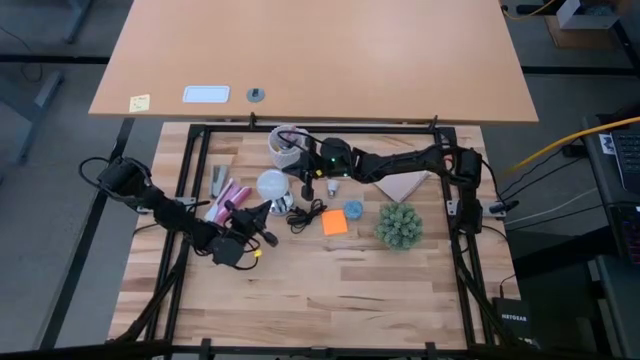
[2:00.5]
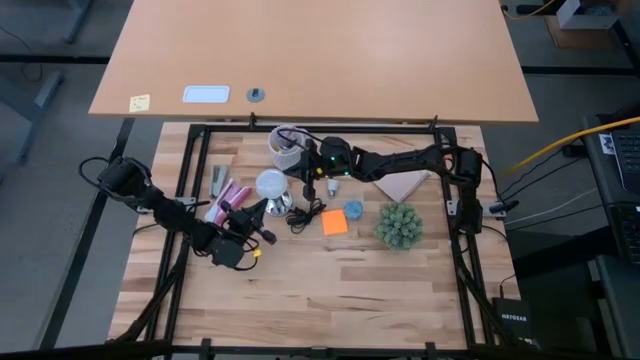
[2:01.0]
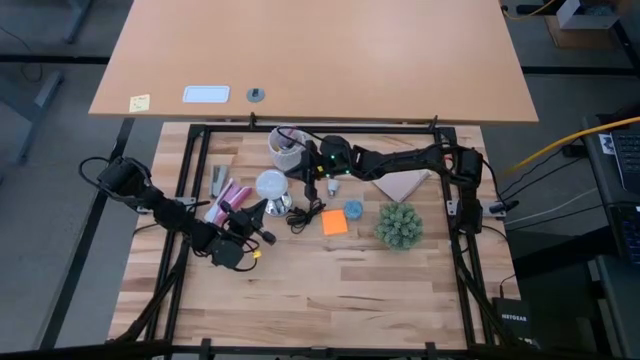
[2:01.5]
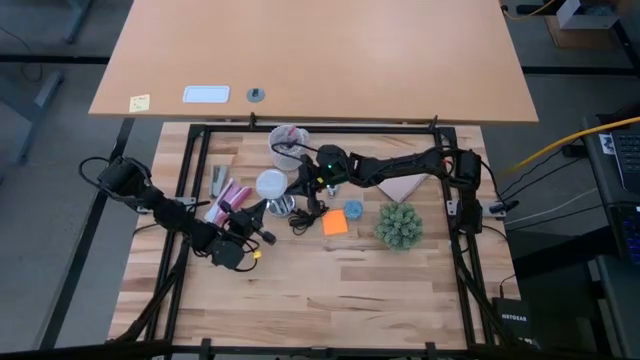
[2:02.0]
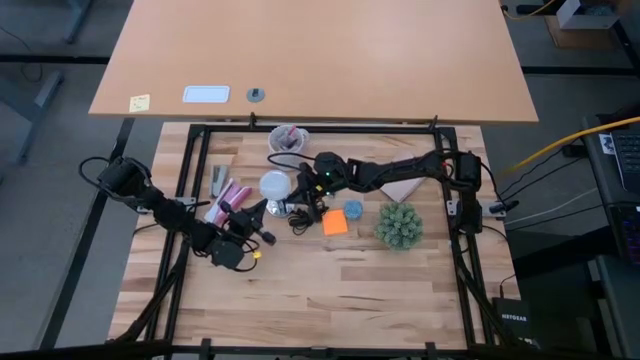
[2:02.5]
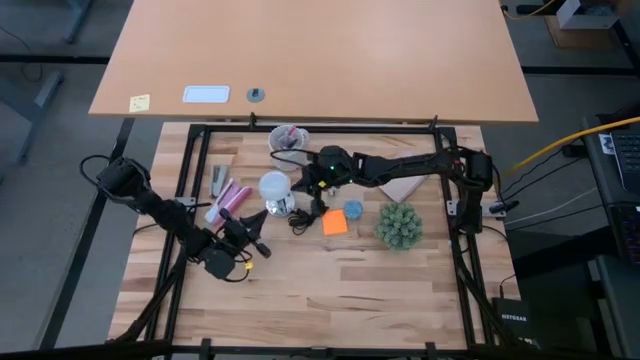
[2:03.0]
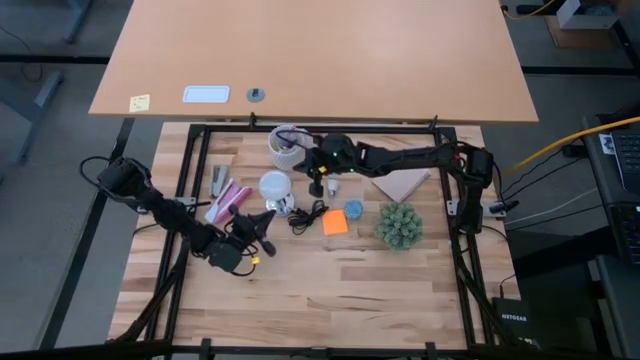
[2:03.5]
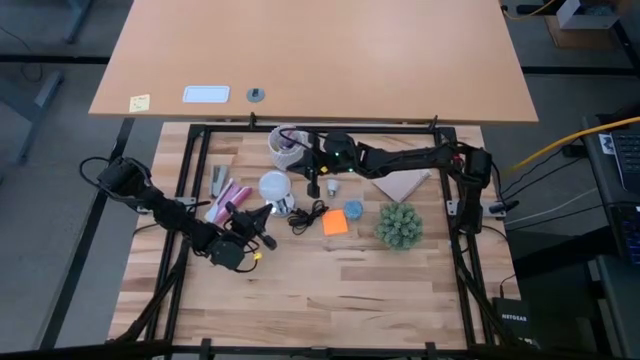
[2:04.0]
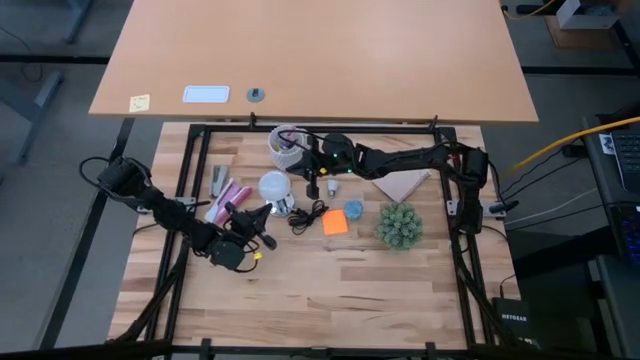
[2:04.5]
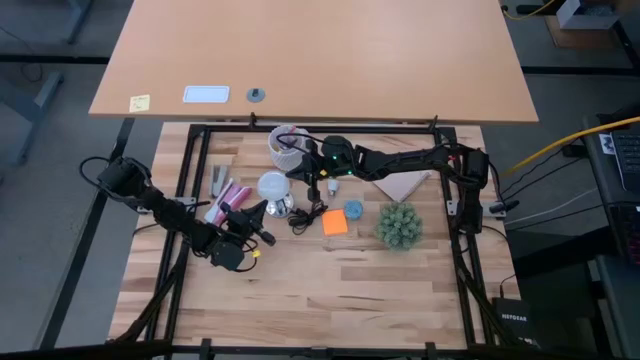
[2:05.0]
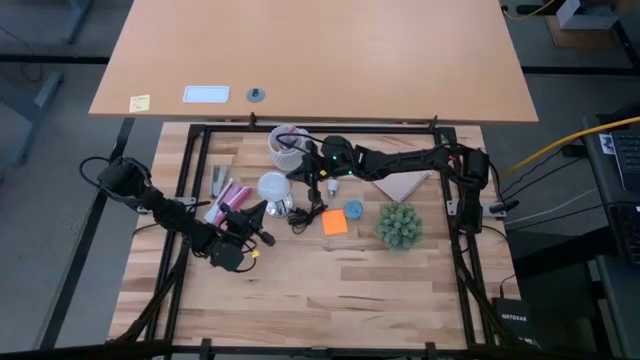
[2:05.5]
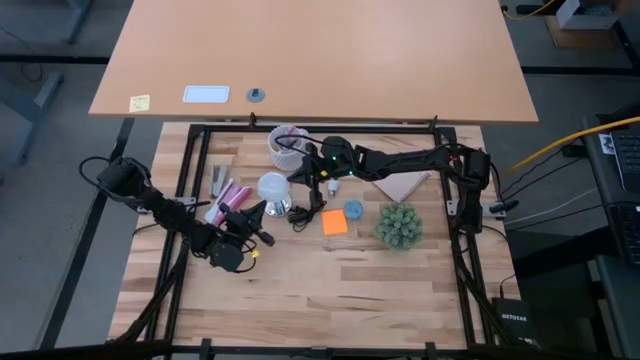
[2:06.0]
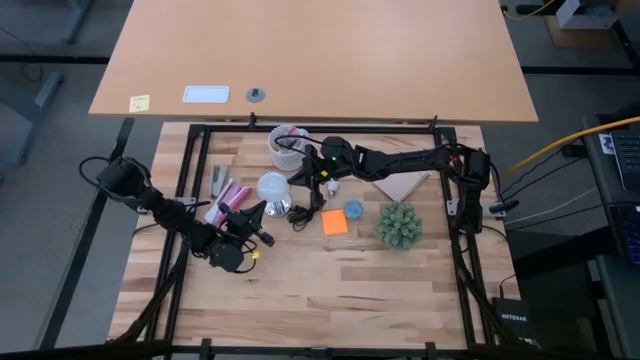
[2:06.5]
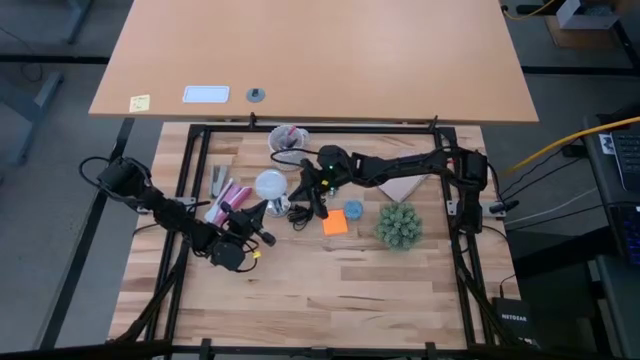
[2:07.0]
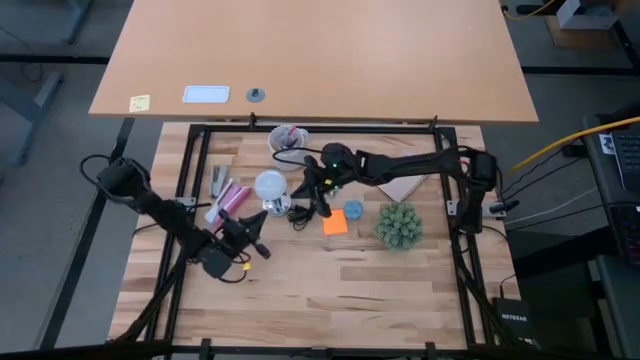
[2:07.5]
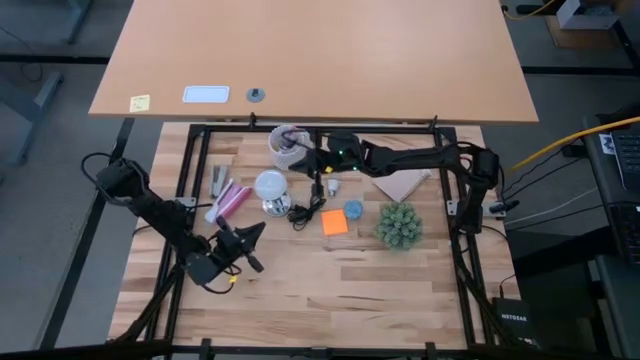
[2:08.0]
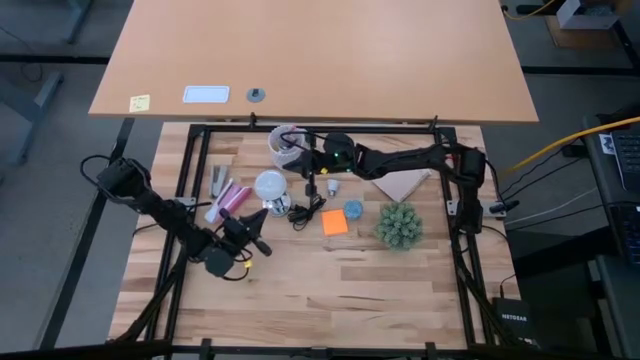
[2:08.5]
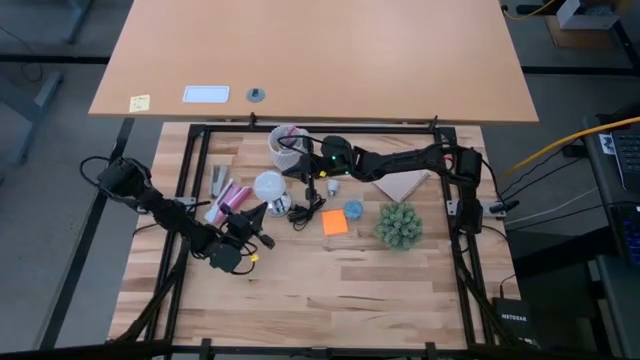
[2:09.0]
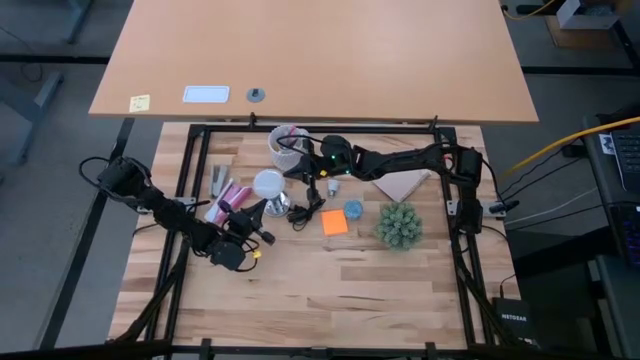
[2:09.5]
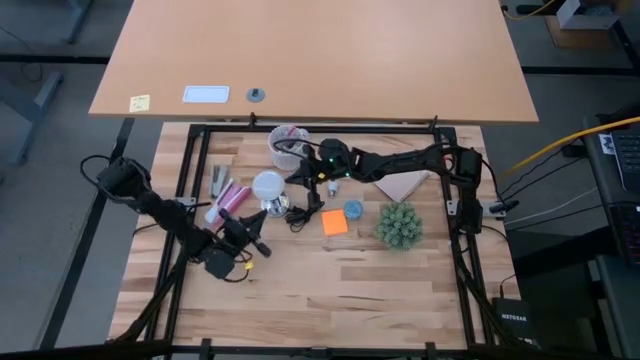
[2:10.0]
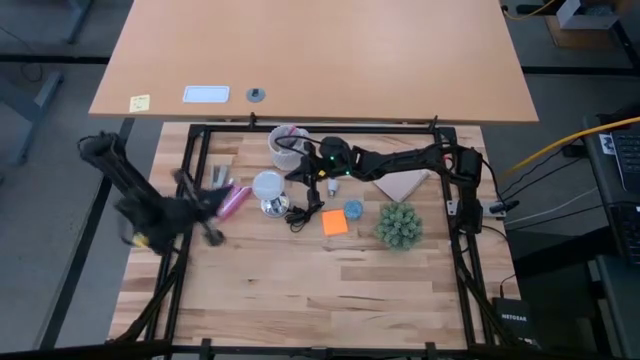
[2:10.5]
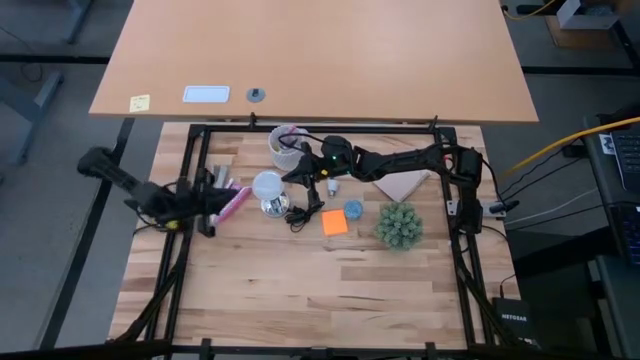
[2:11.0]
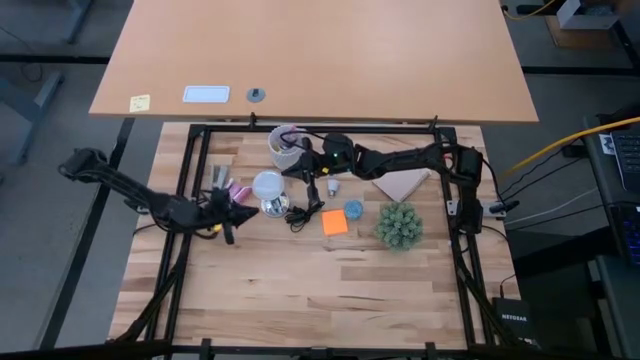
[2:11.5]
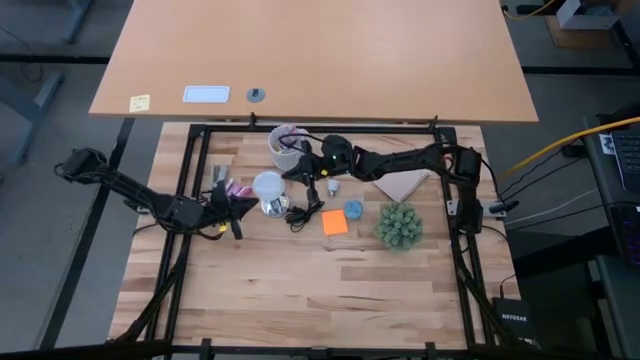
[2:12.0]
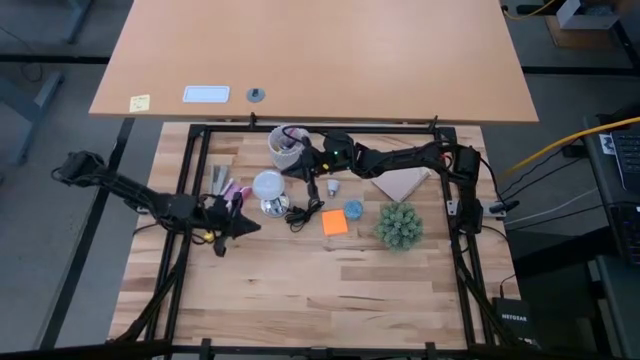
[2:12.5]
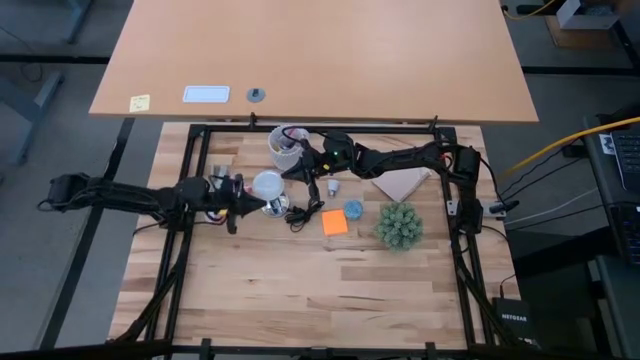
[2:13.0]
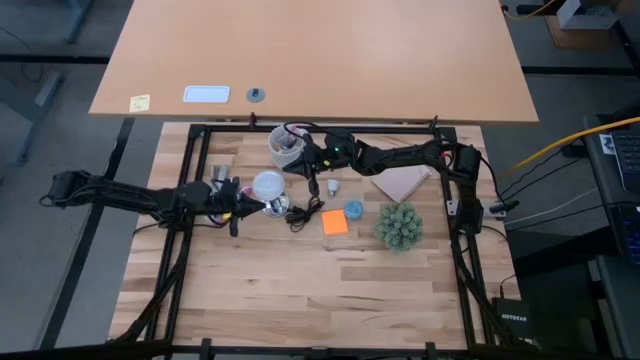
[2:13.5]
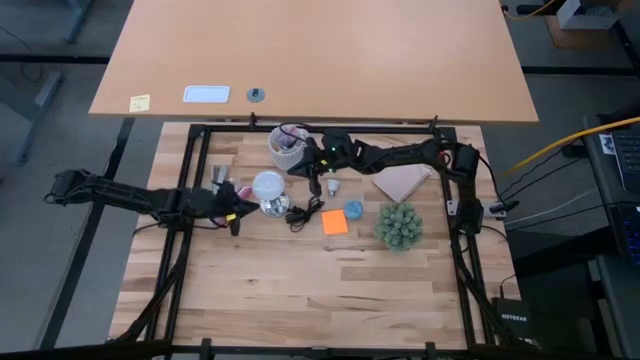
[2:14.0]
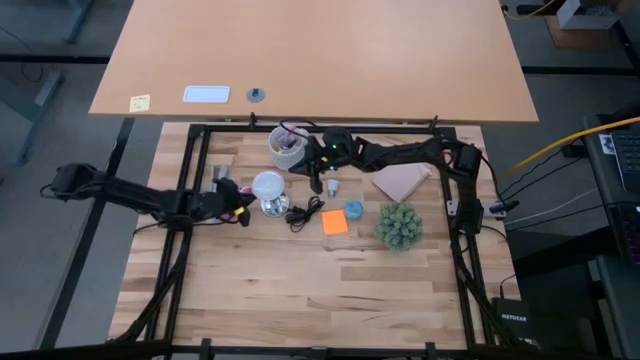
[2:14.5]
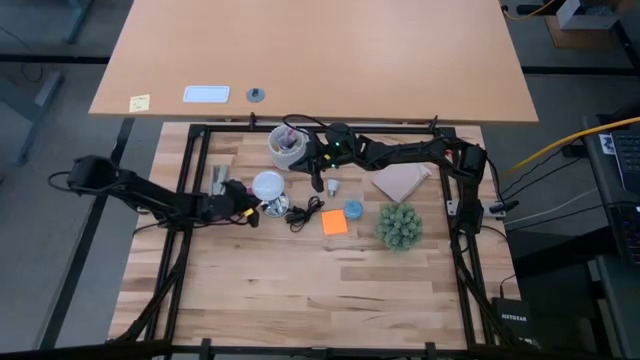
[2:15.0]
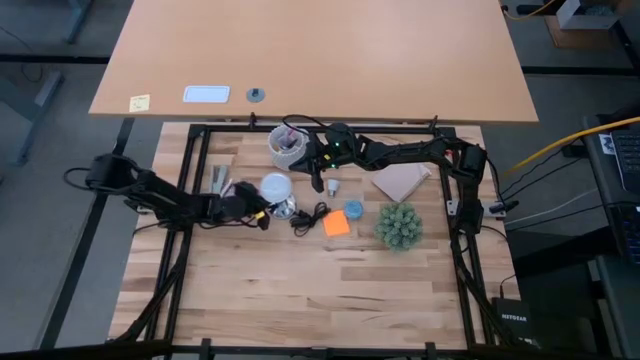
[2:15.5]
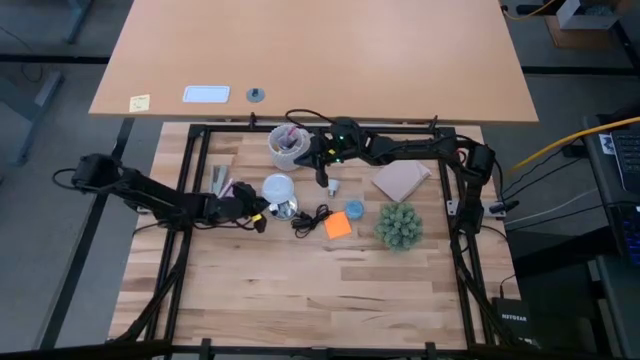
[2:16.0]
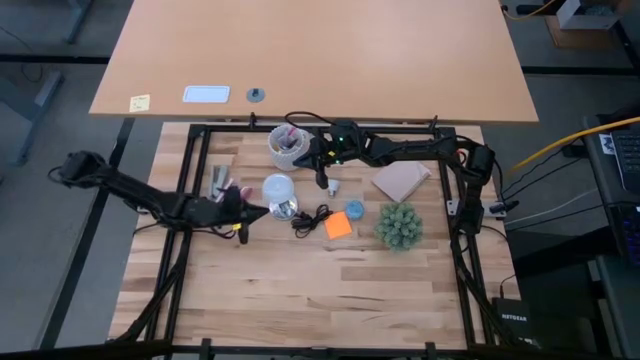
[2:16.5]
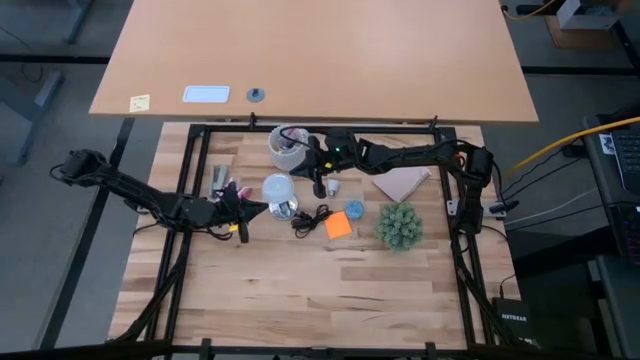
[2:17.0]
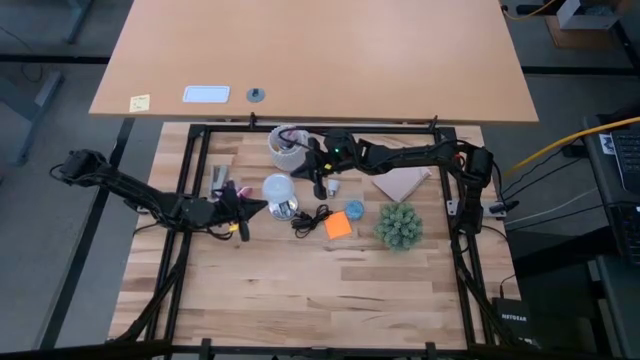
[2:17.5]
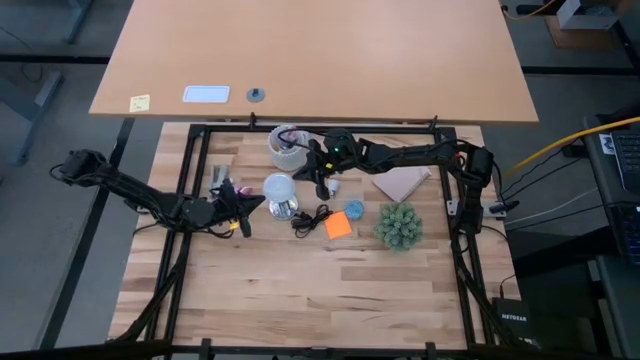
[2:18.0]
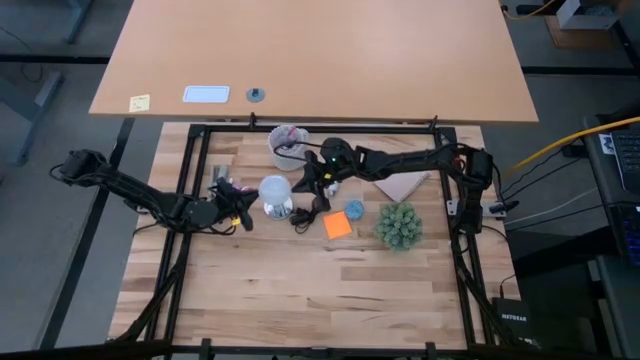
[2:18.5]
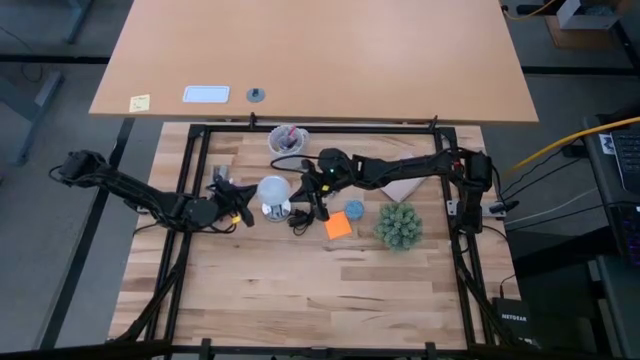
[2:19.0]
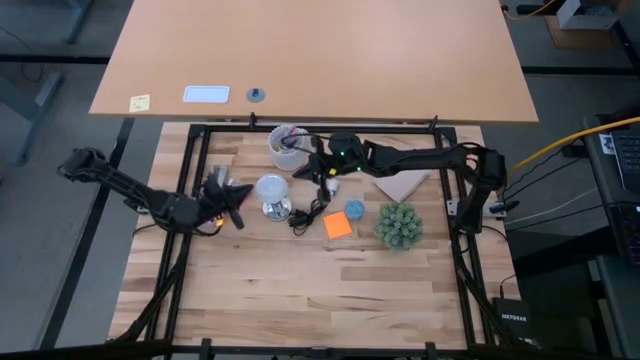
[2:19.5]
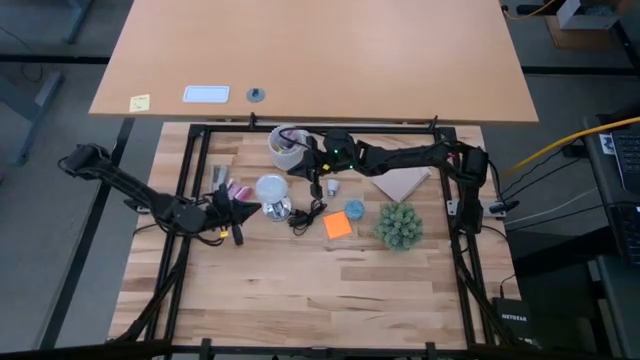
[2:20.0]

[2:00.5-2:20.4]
Task: Screw lightbulb
Insert the lightbulb into the silver lamp

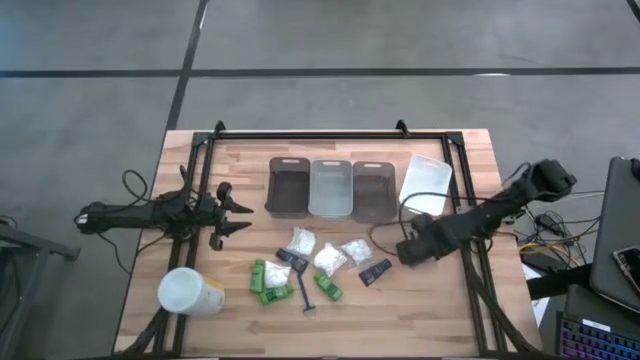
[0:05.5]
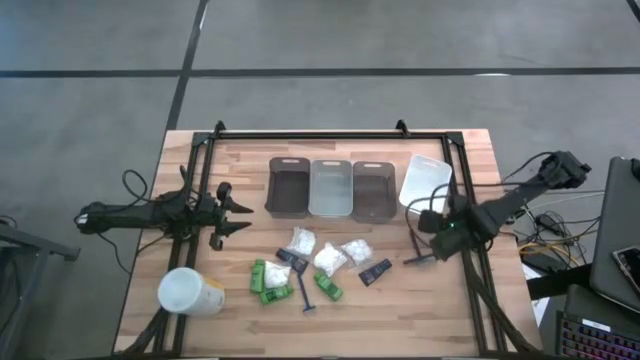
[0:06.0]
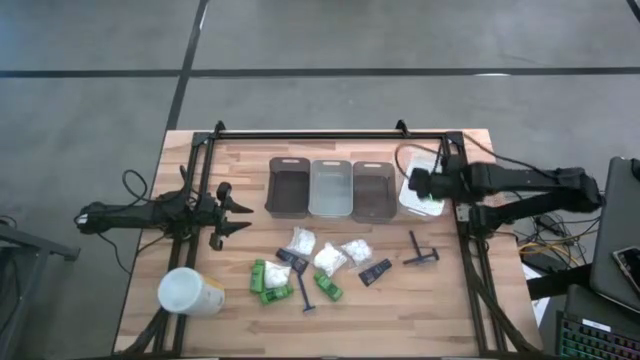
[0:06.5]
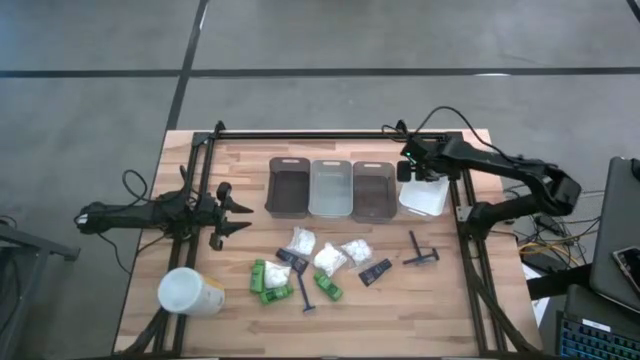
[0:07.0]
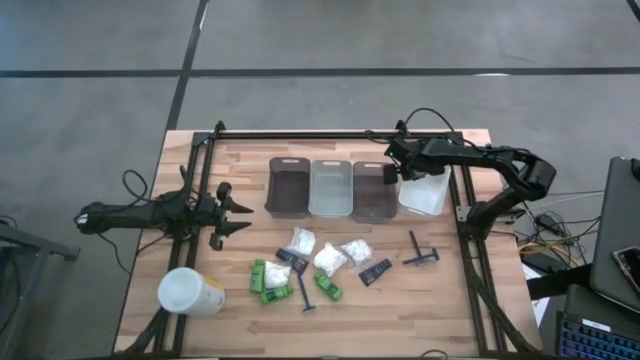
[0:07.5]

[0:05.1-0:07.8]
Task: Pick & Place Travel size toiletries
Adjust the white bin on the table
